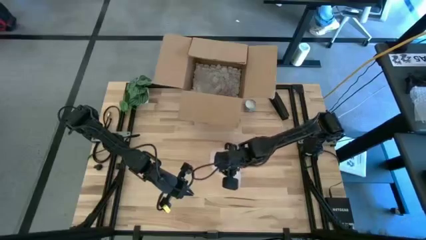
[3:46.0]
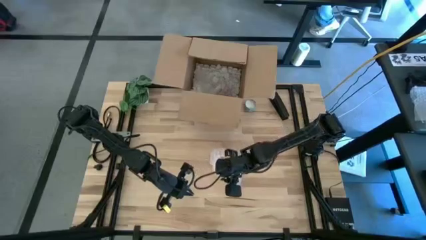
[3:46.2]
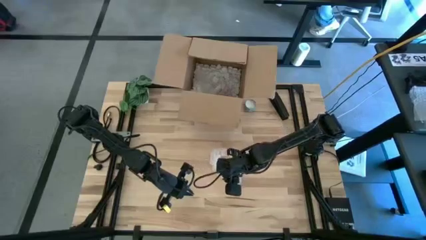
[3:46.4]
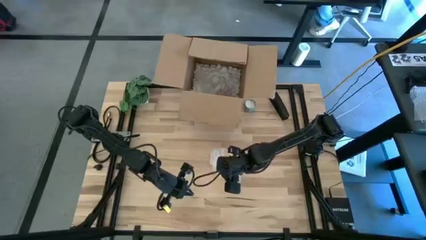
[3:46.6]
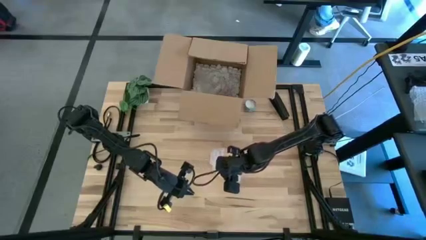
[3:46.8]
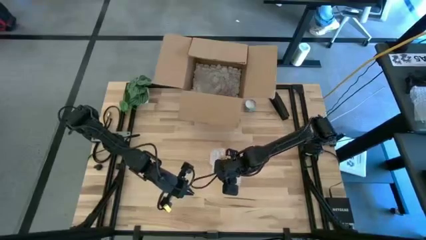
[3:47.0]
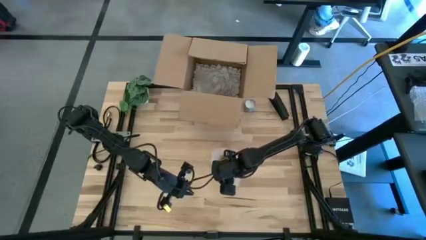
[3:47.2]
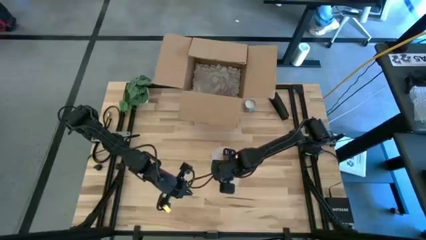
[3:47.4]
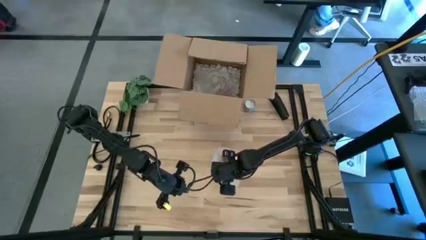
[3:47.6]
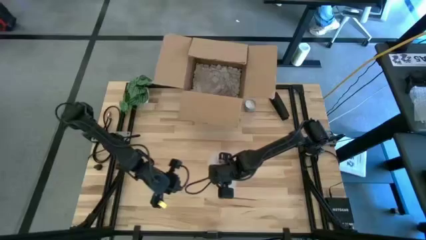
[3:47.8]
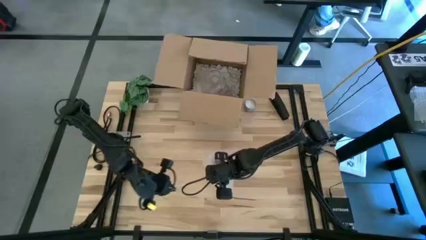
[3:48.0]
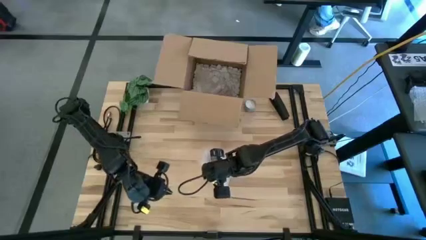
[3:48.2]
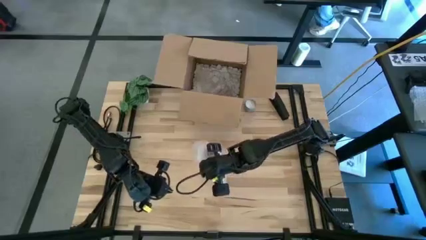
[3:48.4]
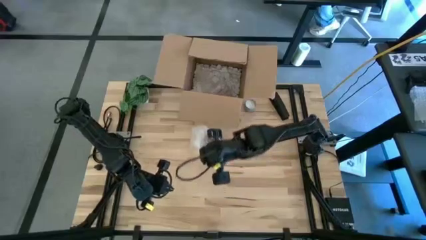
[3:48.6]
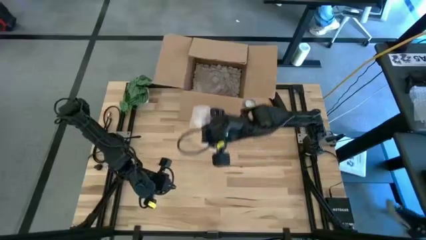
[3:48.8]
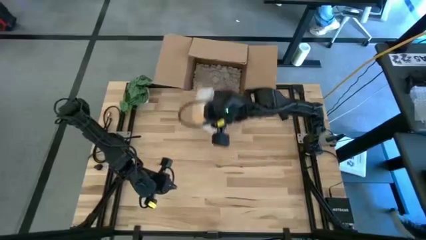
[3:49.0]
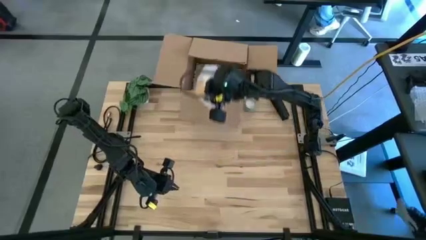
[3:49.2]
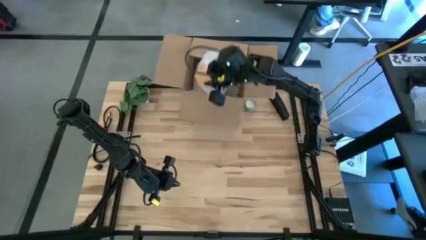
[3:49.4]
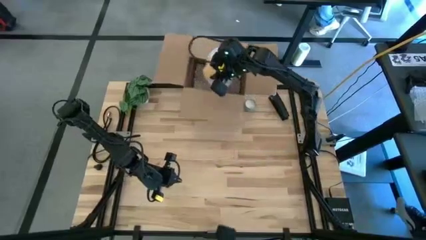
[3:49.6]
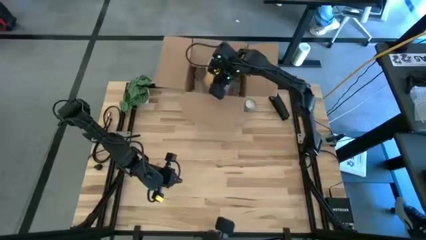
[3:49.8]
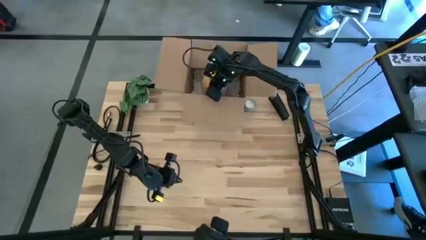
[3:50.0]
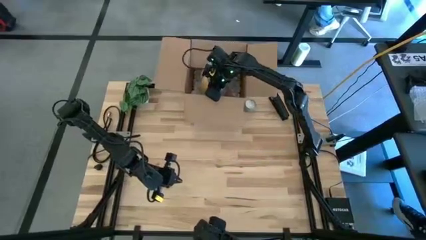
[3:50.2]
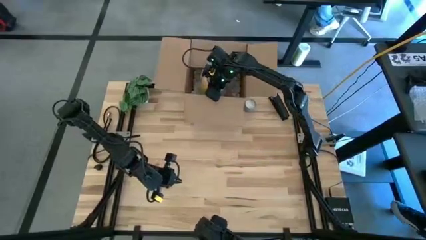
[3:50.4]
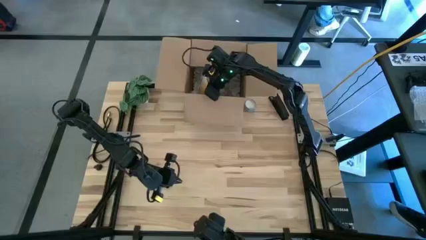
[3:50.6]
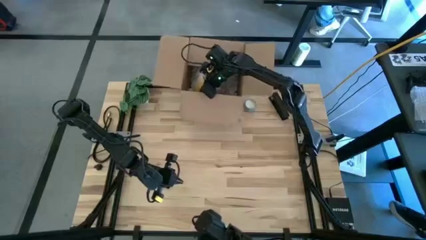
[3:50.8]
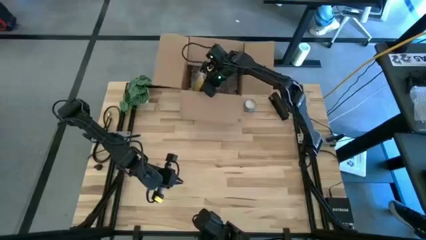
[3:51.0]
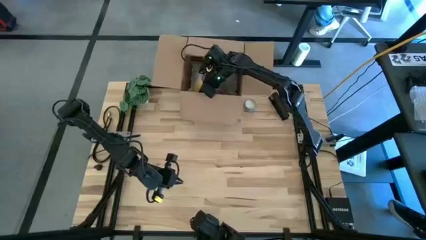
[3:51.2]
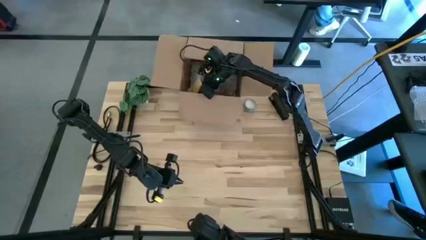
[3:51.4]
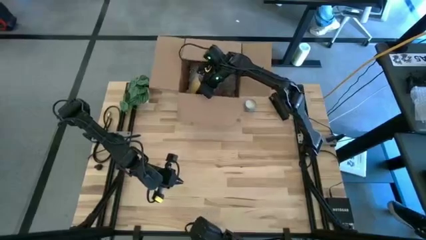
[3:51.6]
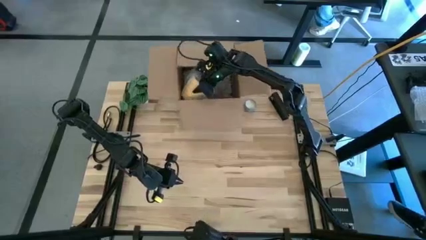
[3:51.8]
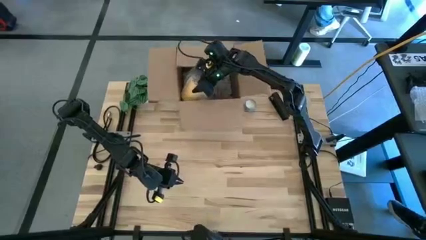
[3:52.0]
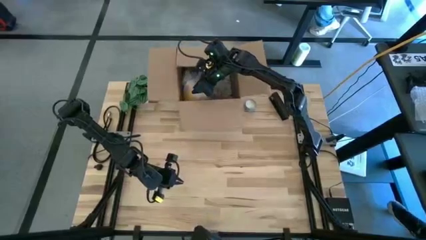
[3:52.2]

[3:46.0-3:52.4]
Task: wrap mug
Put the wrapped yellow mug into the cardboard box

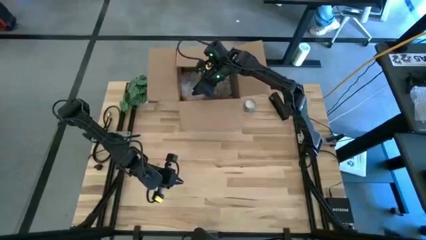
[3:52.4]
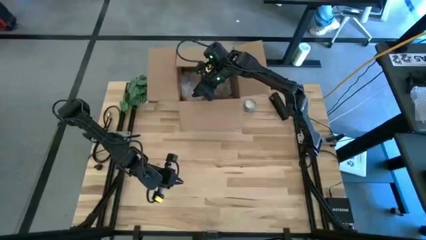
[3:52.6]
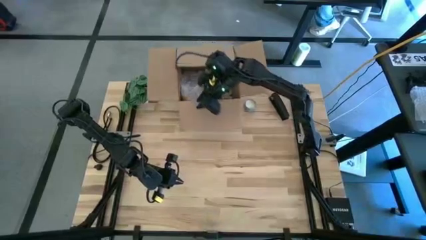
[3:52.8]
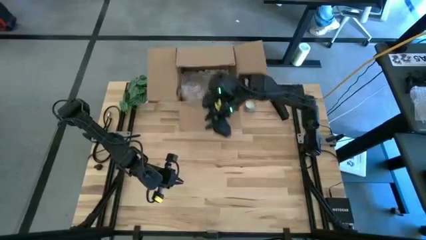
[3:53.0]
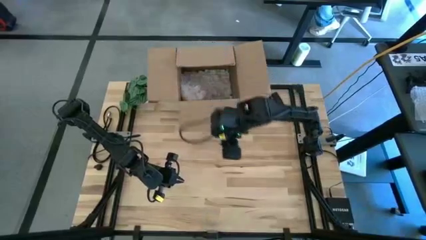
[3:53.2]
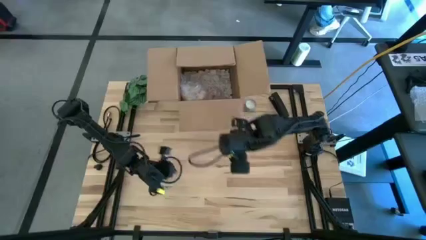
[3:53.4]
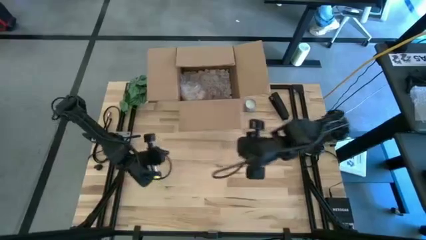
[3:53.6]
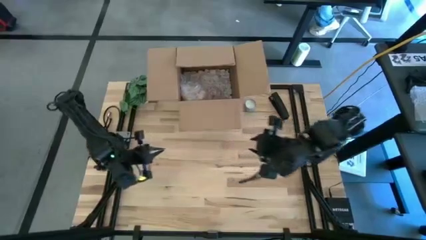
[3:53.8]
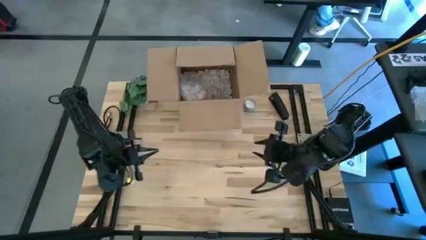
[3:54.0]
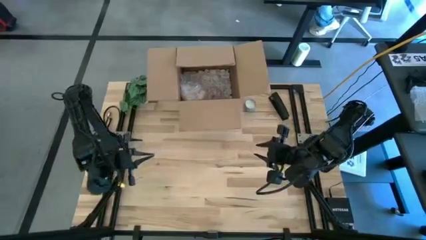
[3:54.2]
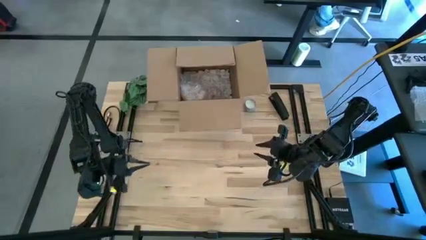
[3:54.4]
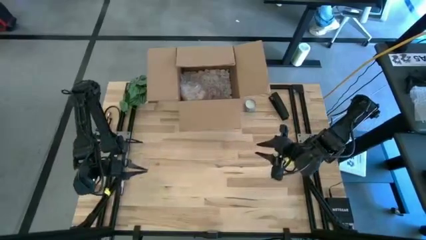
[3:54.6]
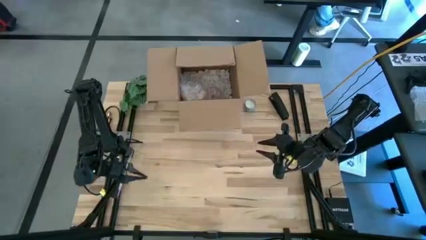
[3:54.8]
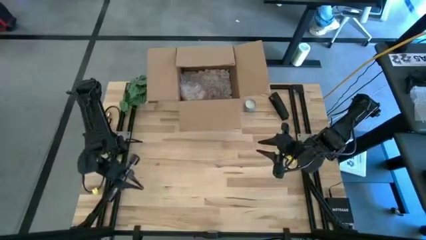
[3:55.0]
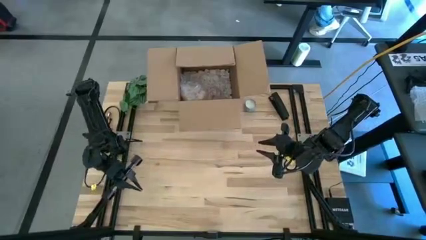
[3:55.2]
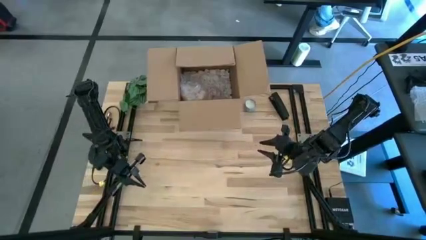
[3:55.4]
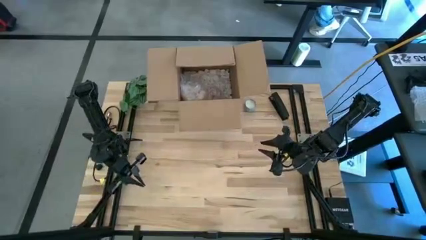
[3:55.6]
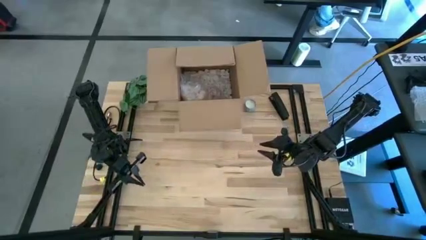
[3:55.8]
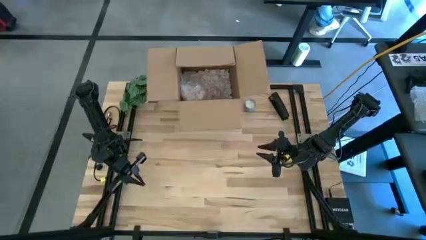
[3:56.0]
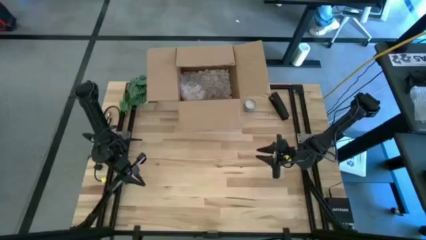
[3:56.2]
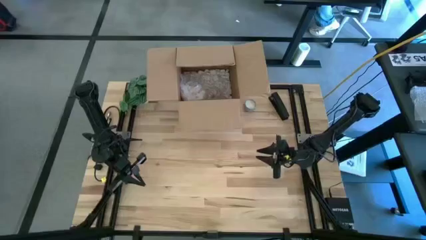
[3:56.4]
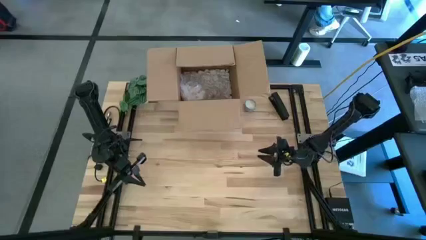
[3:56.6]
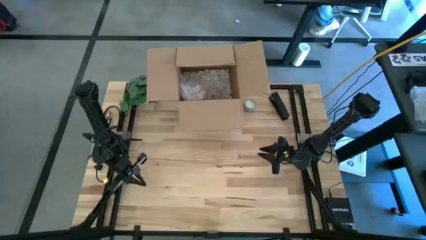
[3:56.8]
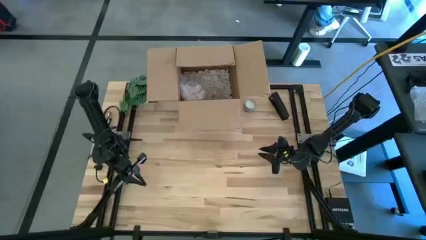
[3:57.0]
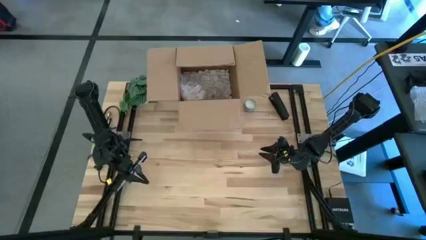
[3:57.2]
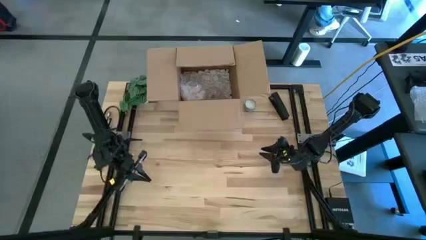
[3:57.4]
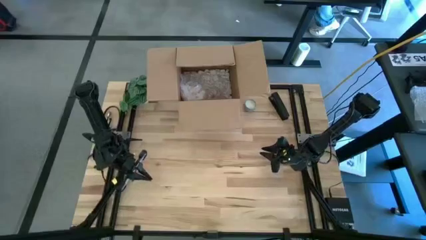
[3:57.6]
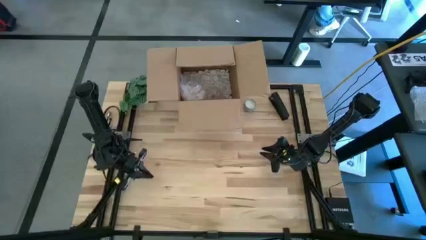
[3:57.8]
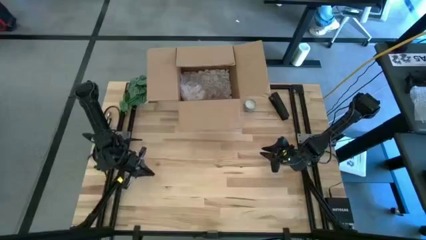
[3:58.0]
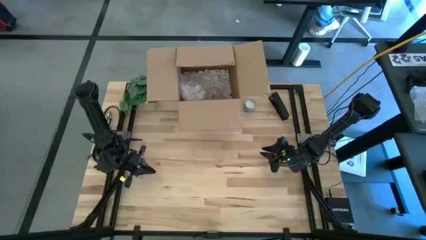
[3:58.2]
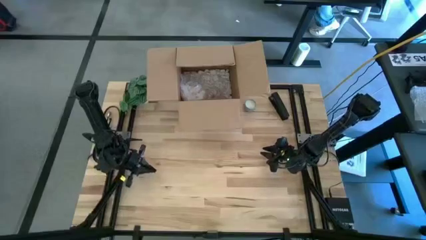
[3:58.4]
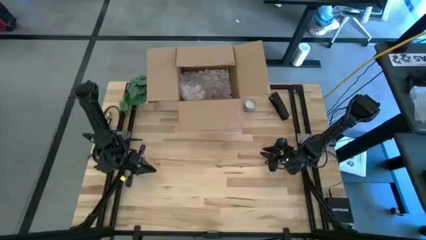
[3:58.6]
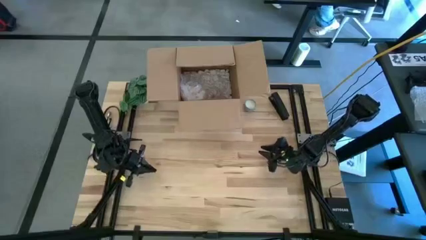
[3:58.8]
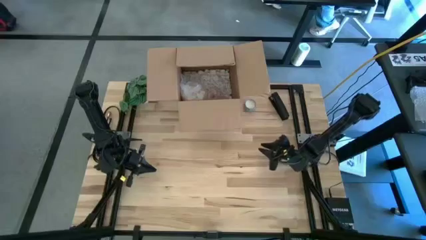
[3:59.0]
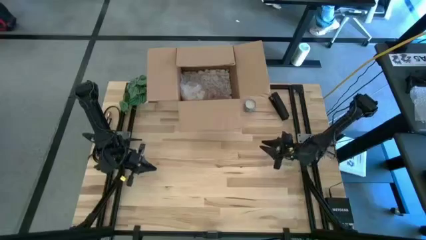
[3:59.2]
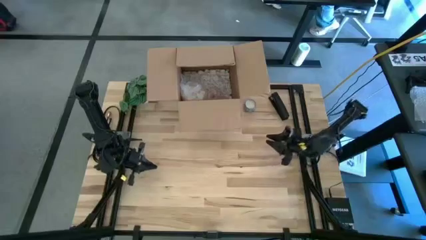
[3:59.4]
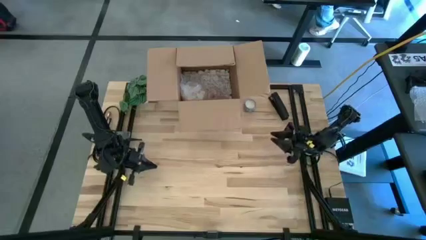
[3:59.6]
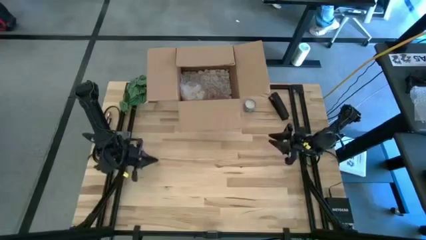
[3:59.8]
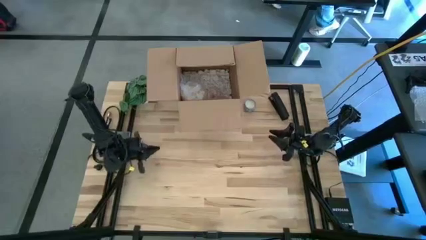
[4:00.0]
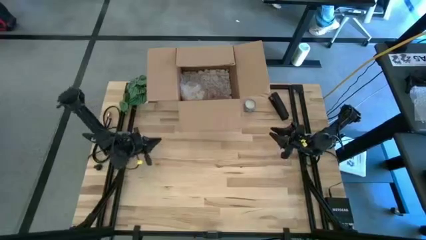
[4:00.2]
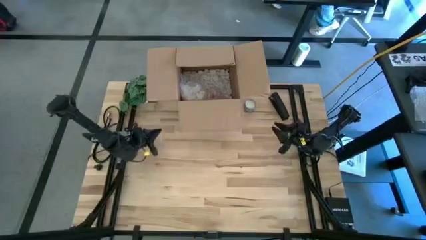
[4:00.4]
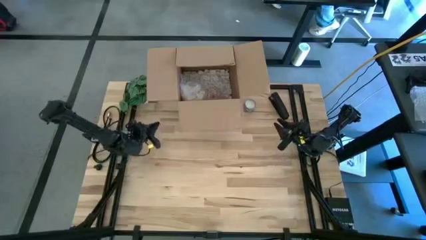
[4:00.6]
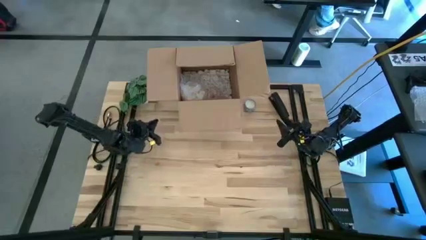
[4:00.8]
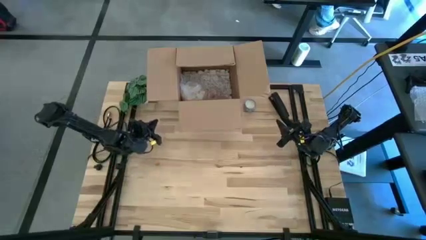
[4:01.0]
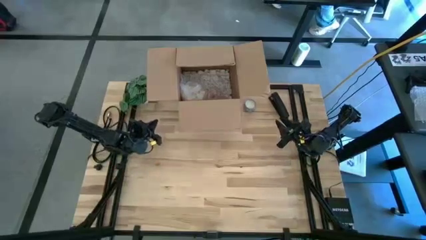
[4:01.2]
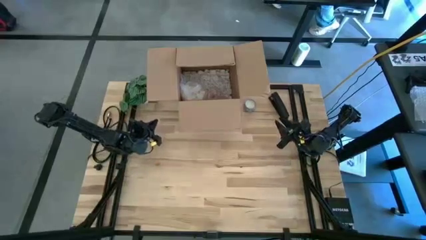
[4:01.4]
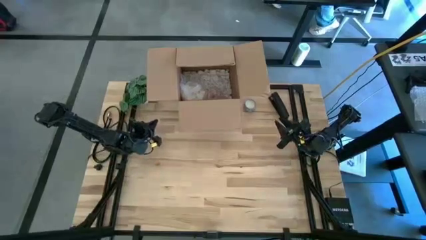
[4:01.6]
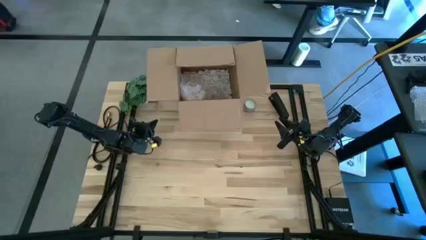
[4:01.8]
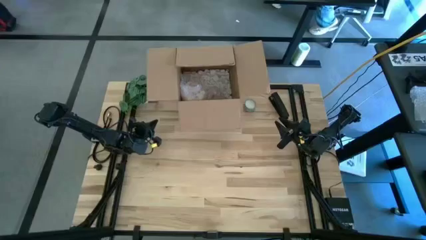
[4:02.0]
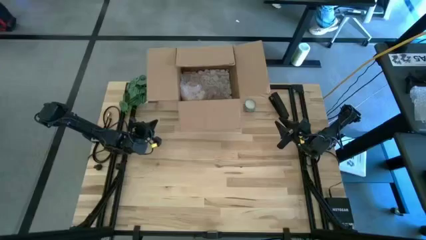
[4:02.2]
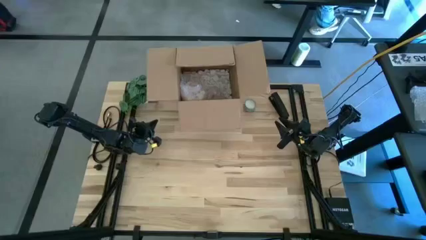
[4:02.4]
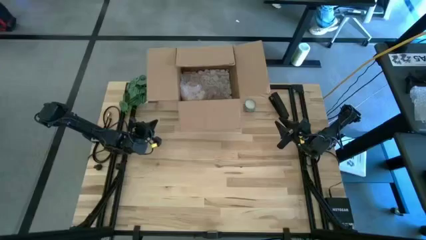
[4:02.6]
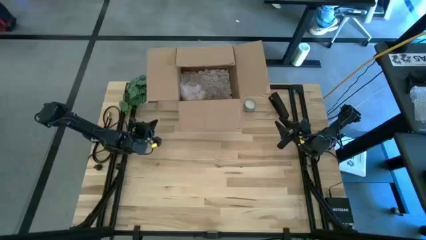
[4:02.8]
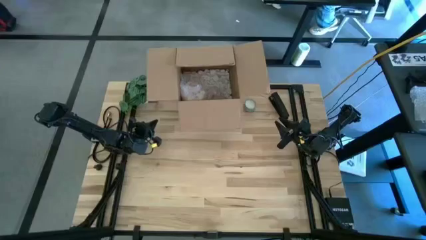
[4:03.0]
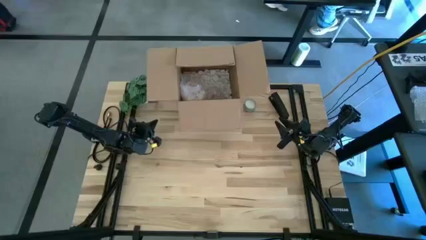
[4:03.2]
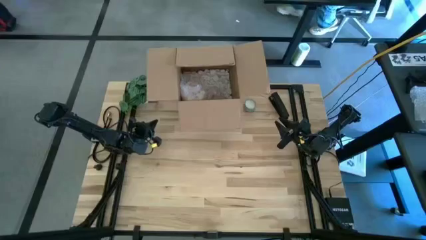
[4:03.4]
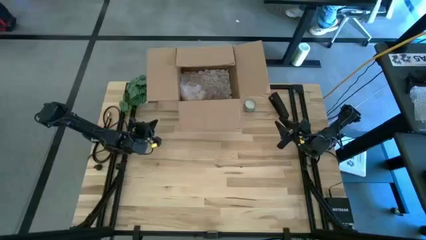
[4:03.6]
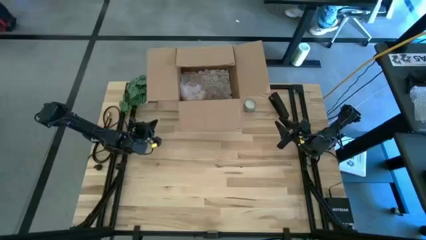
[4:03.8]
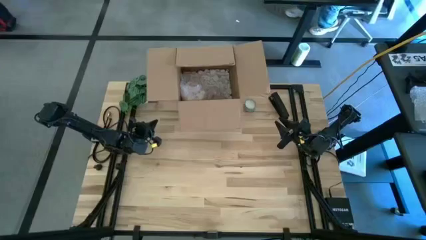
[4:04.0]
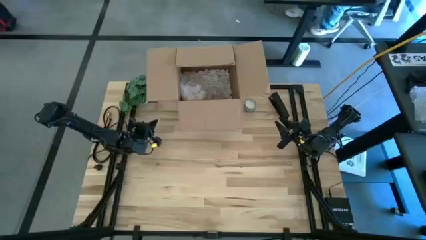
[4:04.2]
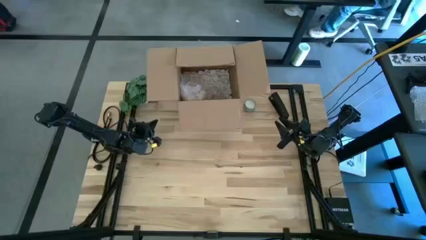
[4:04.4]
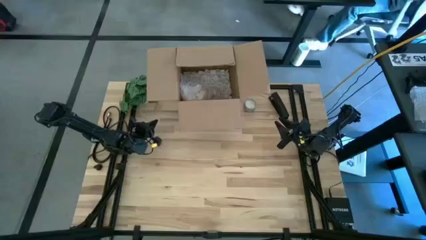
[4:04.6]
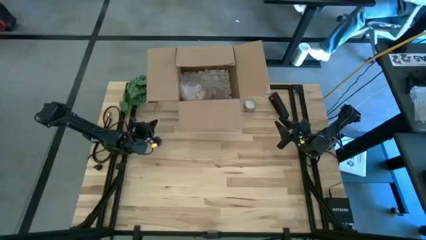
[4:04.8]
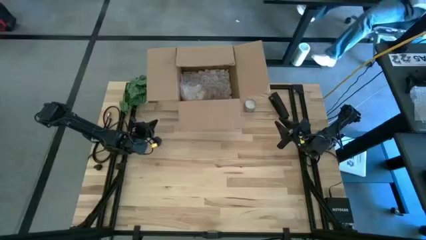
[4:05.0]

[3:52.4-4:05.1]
Return to Home Position
